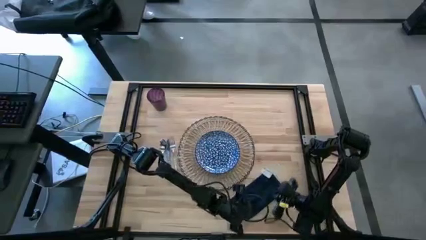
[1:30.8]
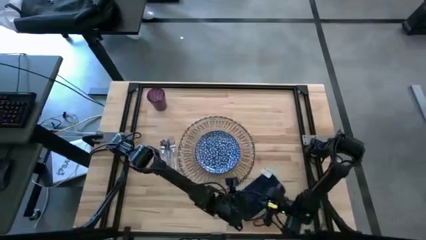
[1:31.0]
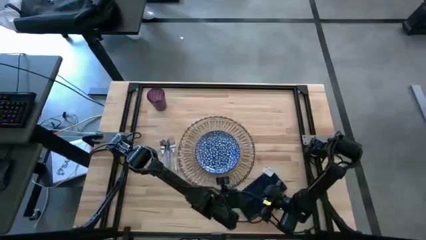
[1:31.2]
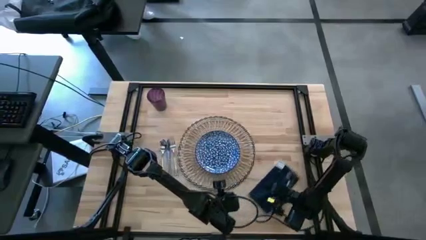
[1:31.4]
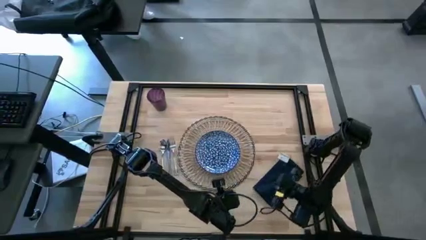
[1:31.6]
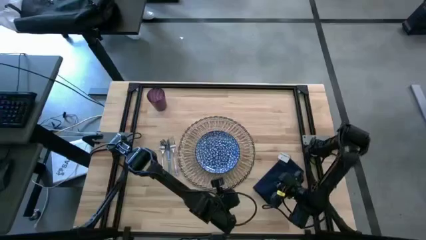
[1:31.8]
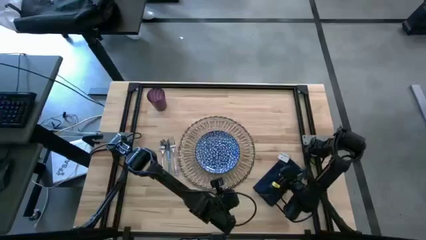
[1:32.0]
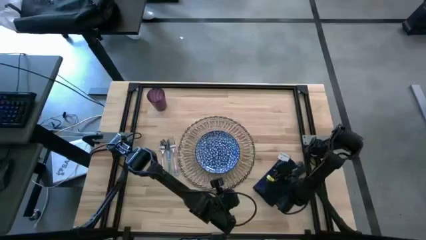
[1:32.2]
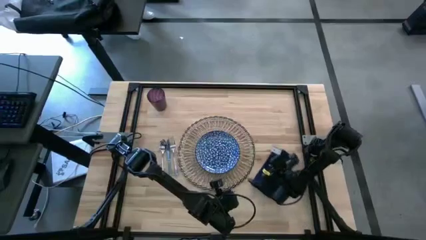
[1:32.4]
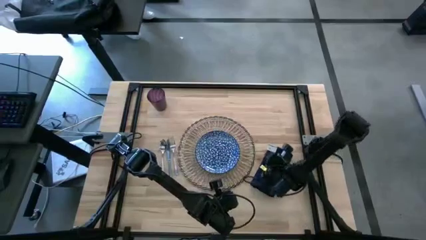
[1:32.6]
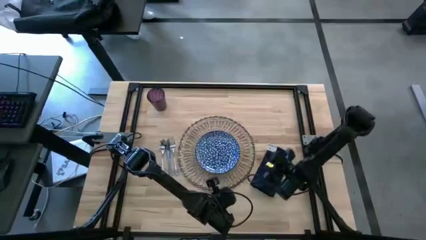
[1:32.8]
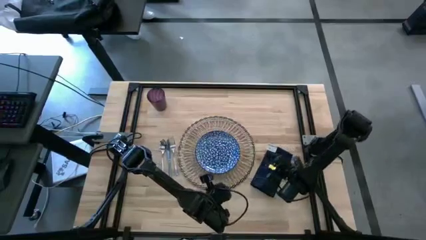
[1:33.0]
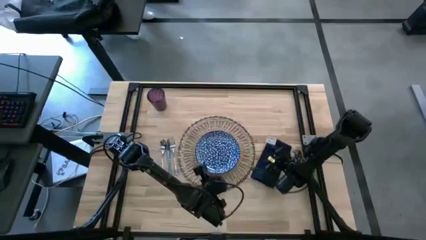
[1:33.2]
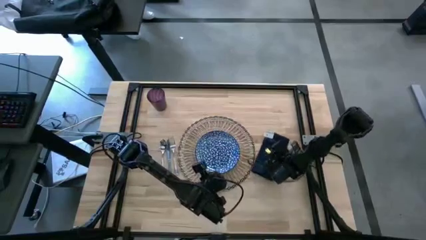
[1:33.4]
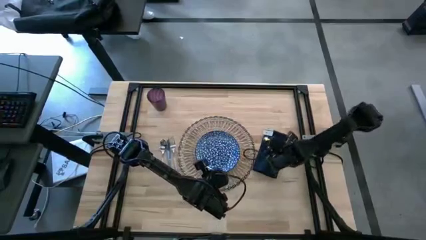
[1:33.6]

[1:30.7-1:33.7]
Task: Set table place
Move the blue napkin to the right side of the placemat

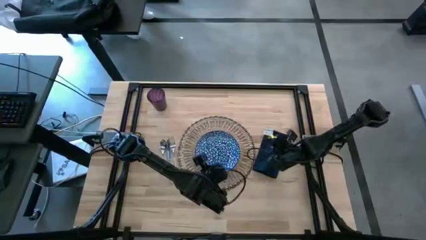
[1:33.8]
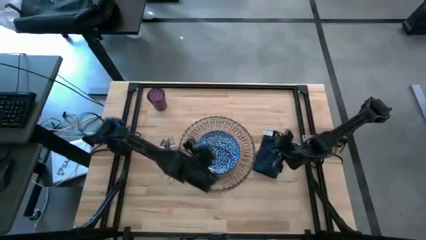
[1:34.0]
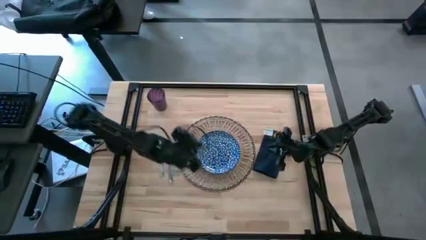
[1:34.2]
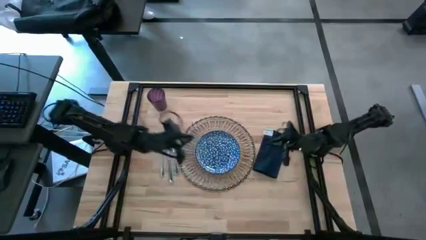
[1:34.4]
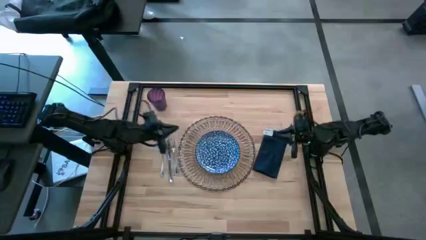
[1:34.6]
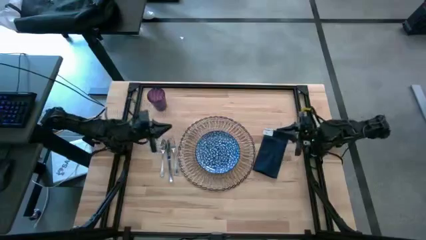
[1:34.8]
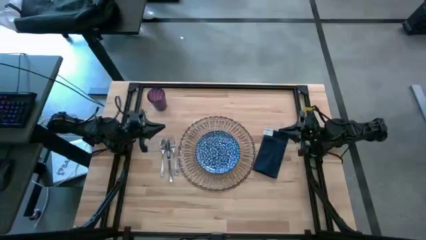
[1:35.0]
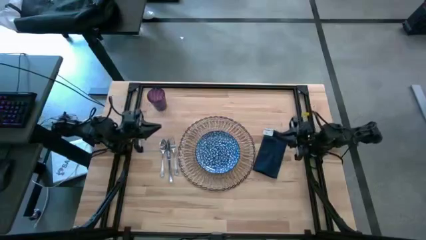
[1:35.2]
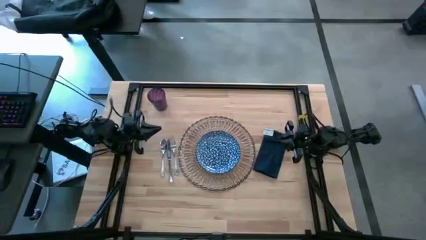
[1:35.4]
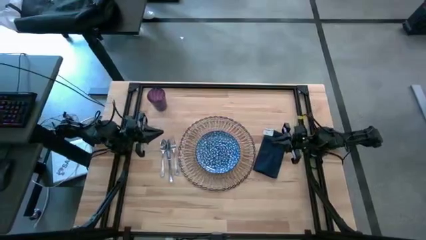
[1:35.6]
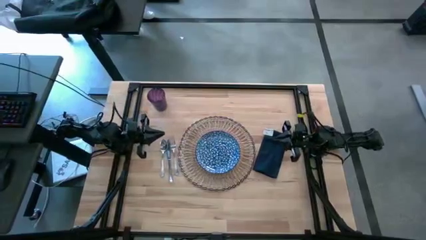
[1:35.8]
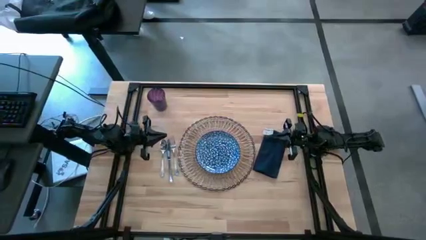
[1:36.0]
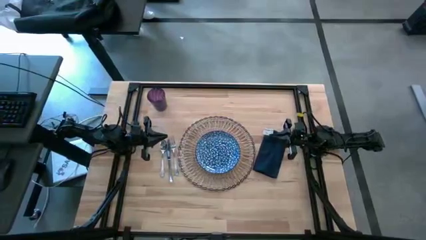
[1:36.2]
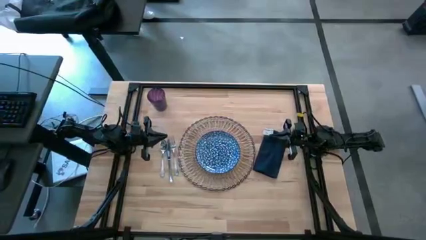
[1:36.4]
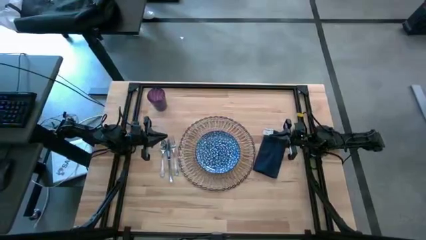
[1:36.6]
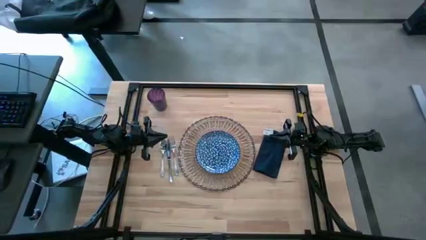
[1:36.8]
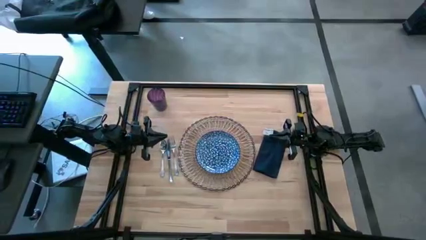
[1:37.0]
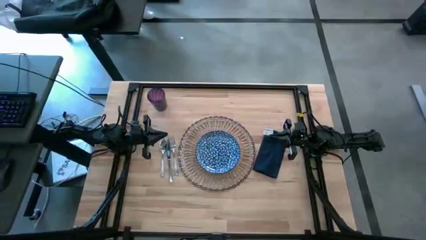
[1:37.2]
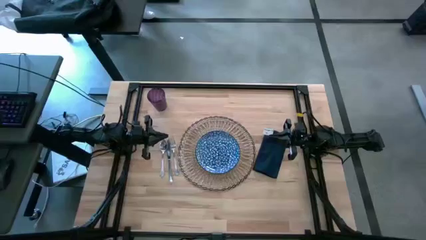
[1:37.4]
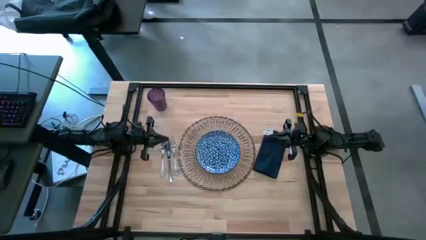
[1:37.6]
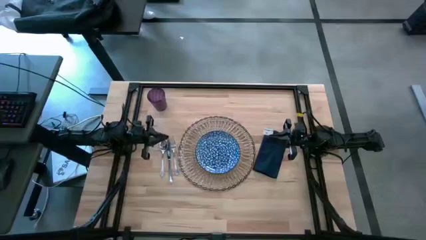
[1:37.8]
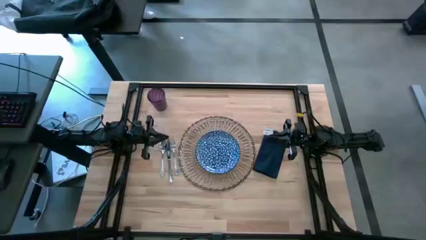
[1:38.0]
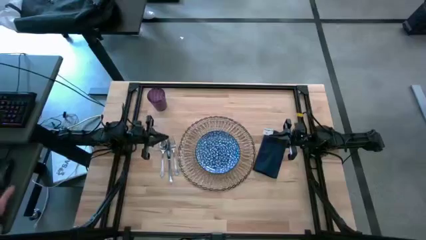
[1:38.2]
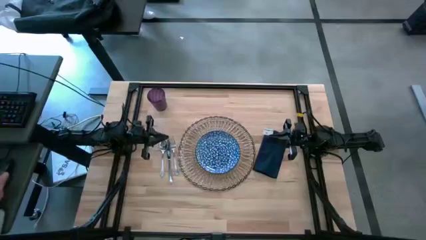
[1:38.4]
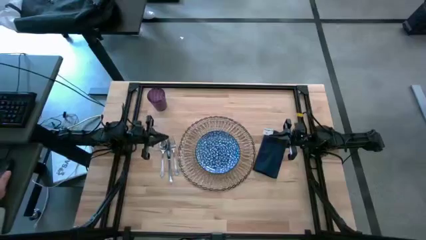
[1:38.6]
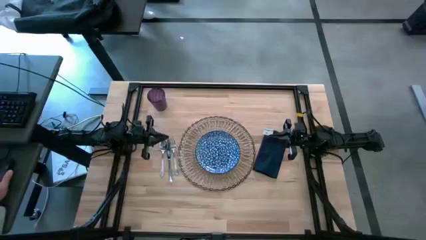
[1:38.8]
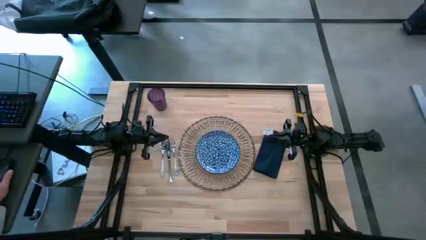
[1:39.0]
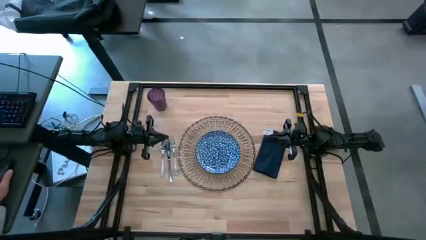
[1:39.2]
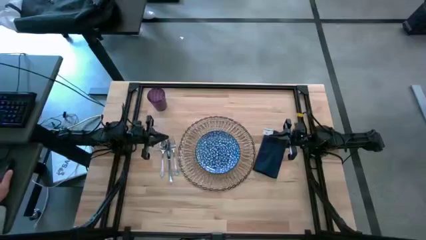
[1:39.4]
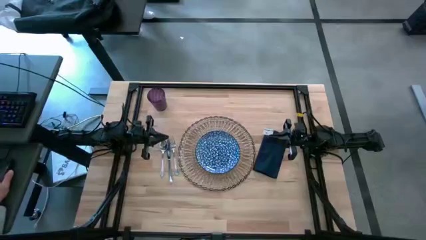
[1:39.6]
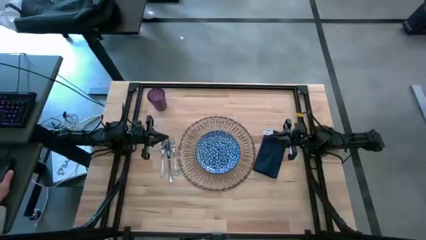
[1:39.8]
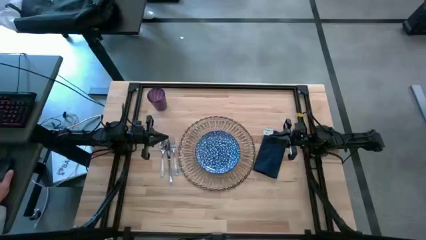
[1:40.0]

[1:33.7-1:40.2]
Return to Home Position

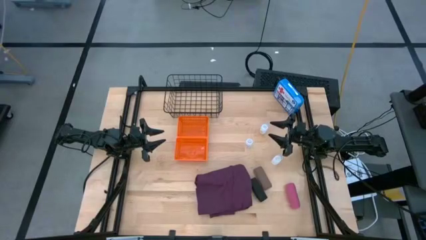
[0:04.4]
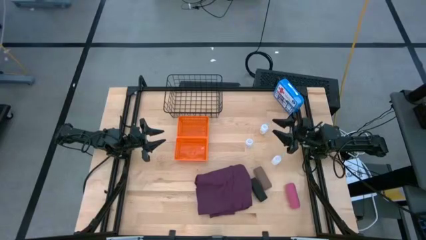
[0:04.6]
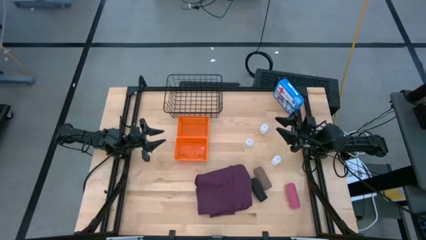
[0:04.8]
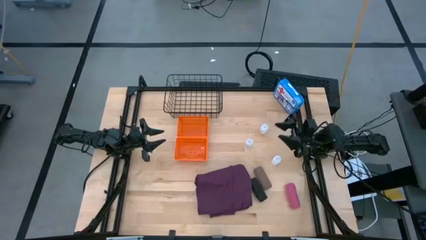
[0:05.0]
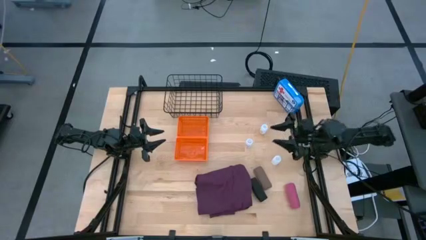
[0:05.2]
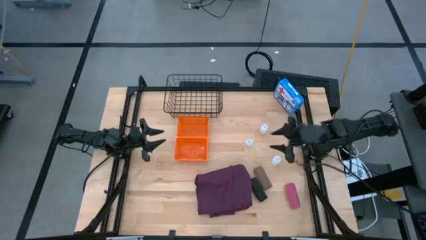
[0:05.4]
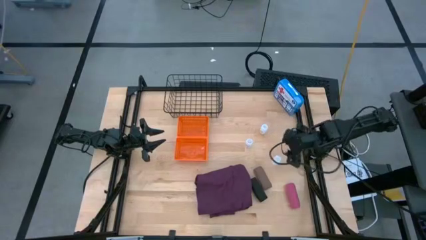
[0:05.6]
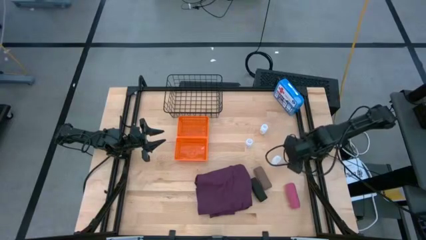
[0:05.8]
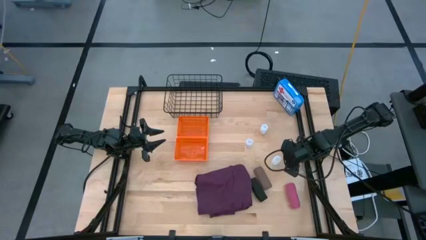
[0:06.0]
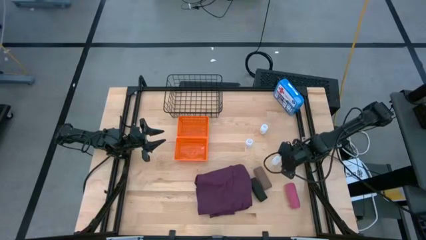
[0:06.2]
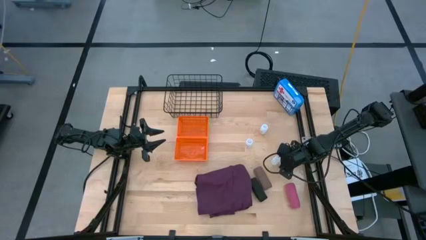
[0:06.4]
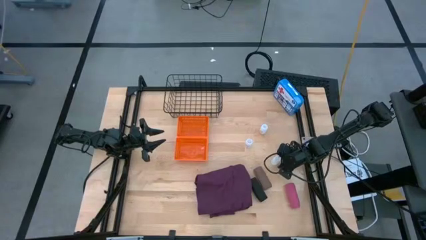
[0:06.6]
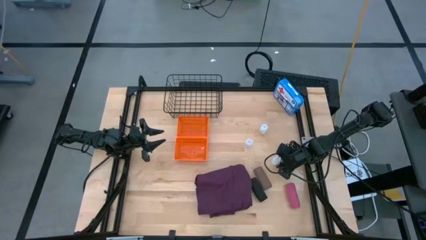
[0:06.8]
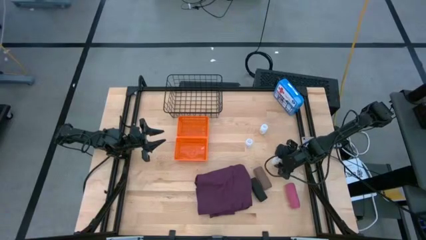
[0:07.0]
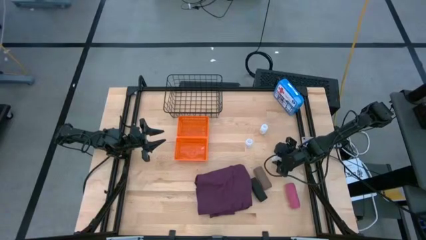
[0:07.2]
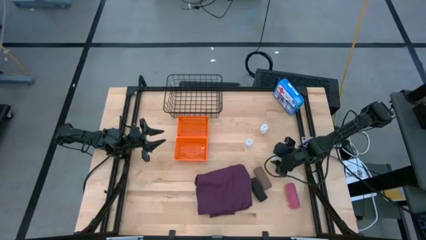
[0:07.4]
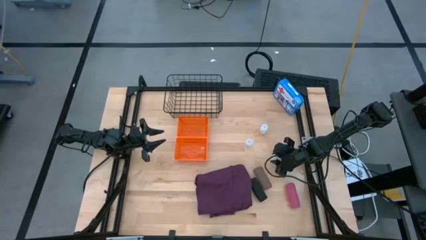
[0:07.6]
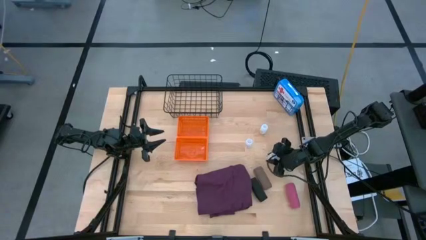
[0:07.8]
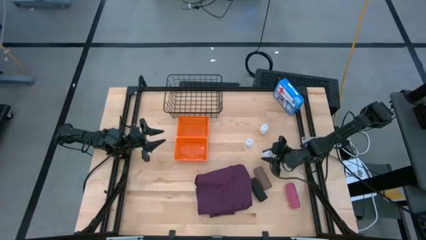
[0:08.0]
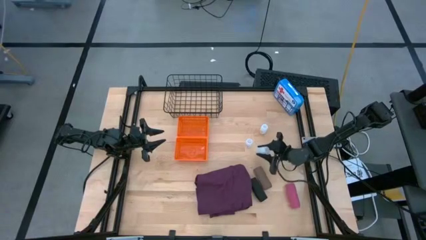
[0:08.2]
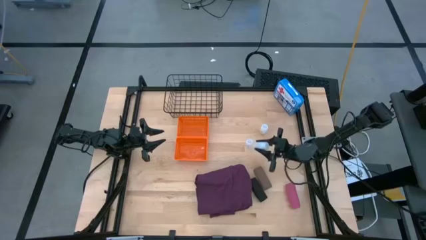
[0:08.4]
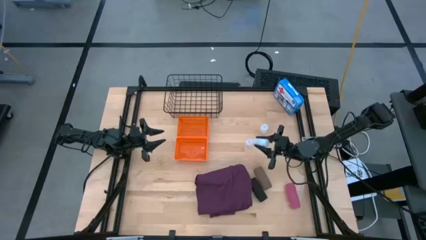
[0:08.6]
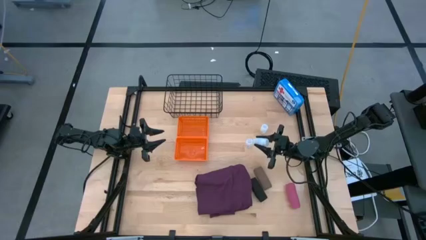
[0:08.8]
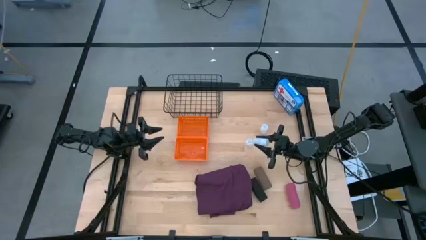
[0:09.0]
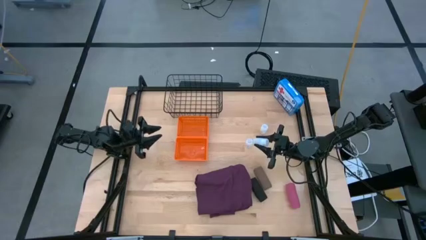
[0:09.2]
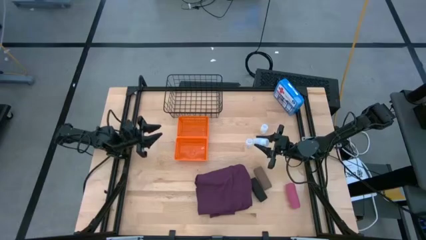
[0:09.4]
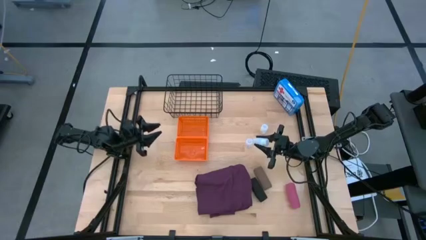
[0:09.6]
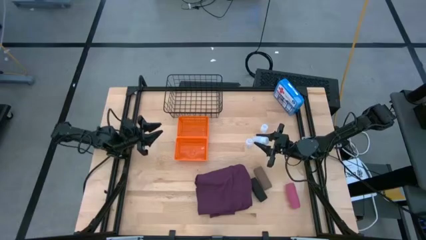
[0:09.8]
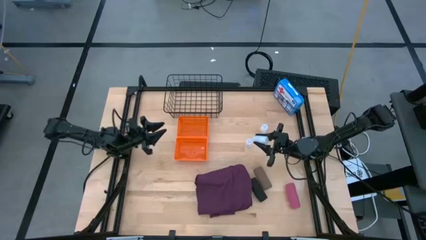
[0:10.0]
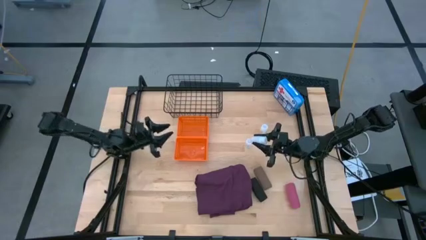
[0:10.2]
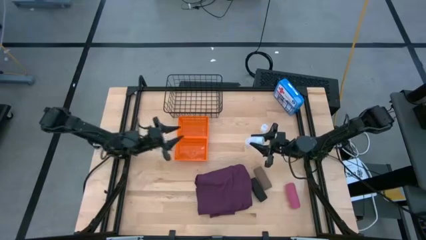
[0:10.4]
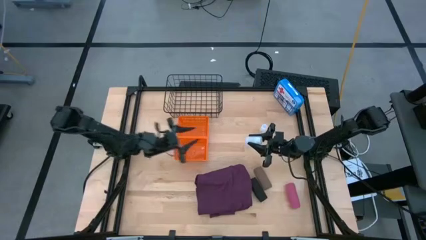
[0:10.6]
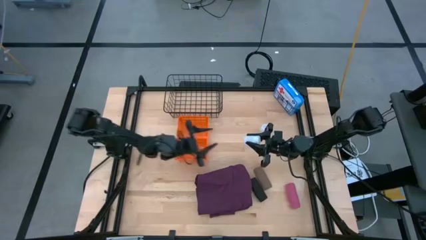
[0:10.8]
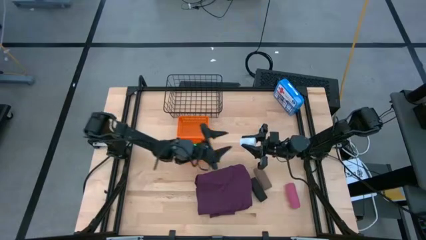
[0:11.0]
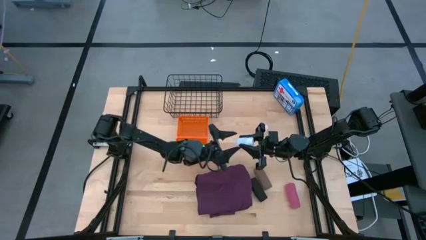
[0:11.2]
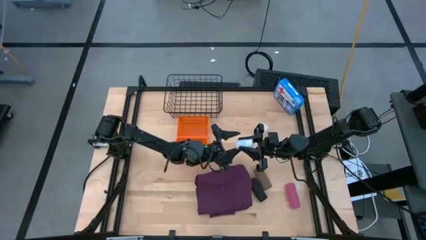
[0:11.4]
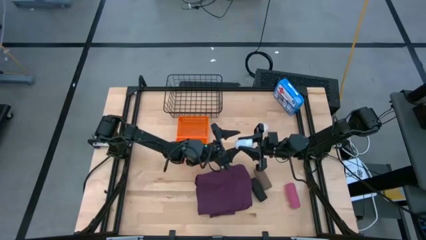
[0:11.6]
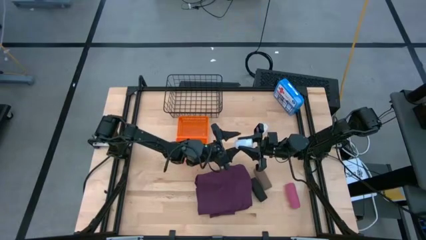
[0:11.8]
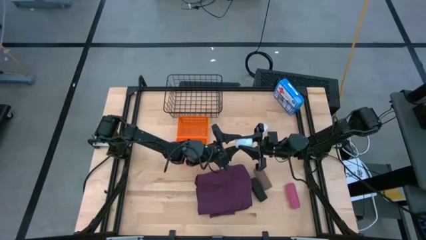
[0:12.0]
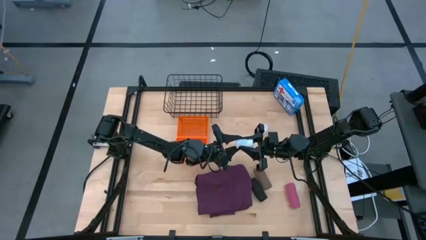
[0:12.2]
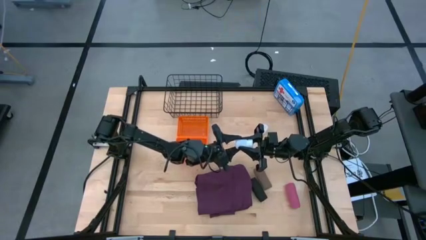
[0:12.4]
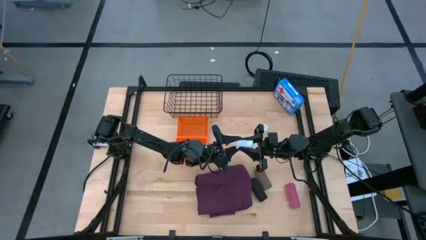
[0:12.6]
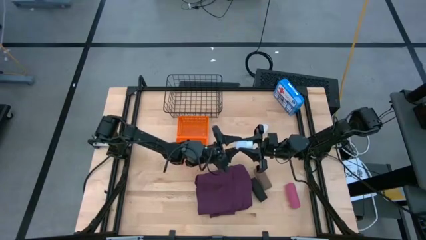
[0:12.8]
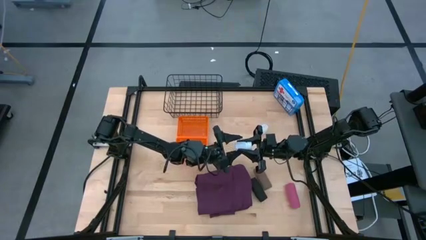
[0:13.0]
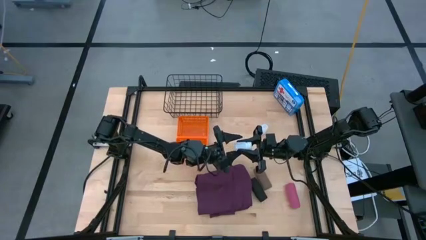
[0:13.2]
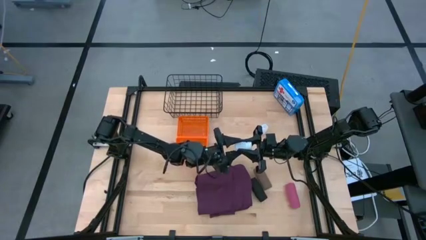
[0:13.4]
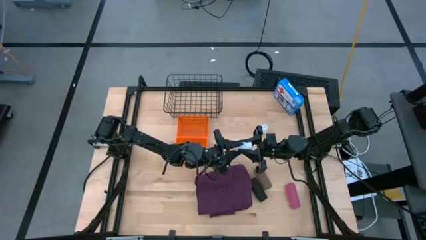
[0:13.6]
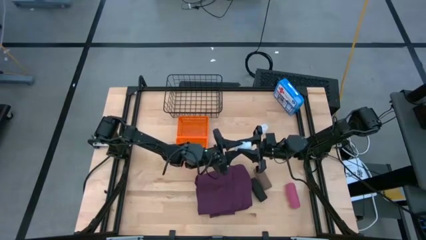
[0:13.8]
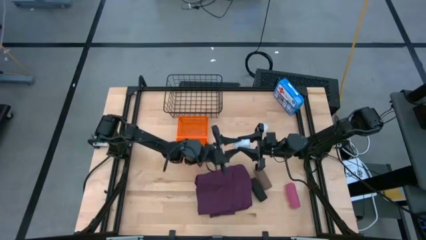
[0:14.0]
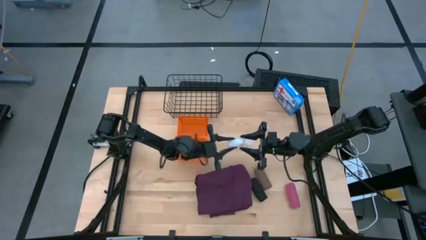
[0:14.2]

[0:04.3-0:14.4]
Task: Pick & place medical supplies in basket/bin
Put the bottom white pill bottle into the top orange bin
